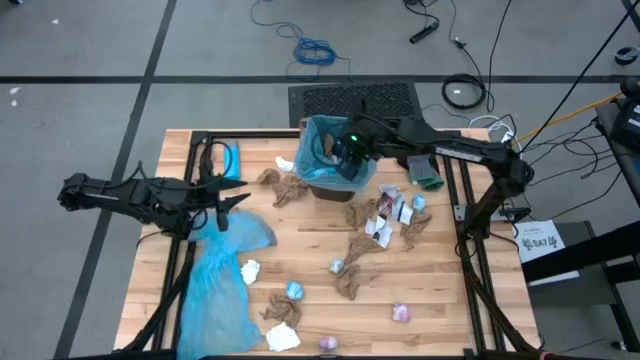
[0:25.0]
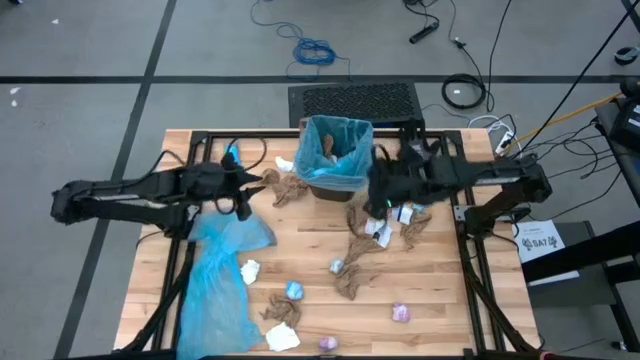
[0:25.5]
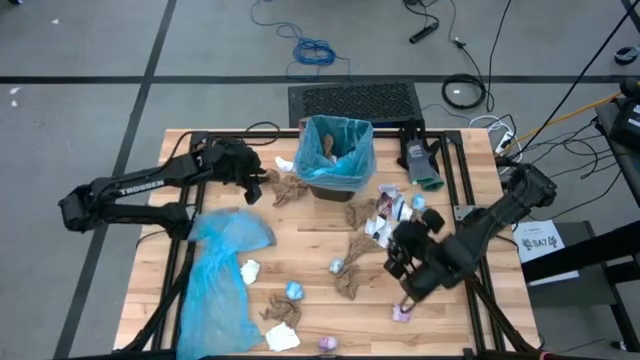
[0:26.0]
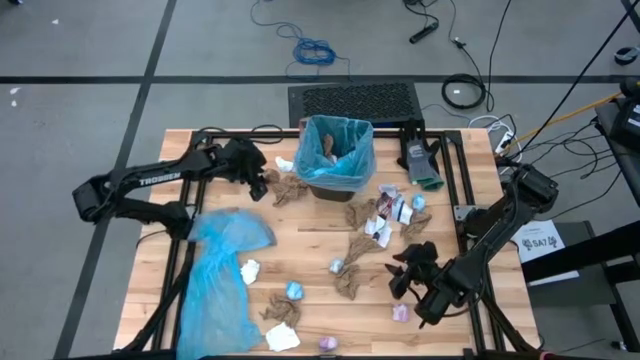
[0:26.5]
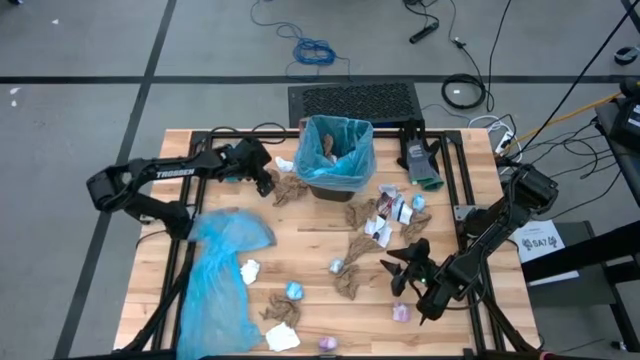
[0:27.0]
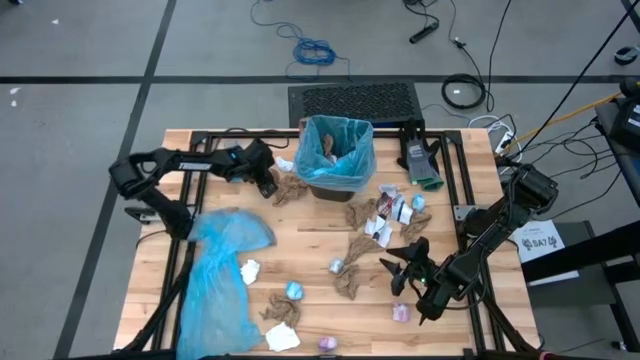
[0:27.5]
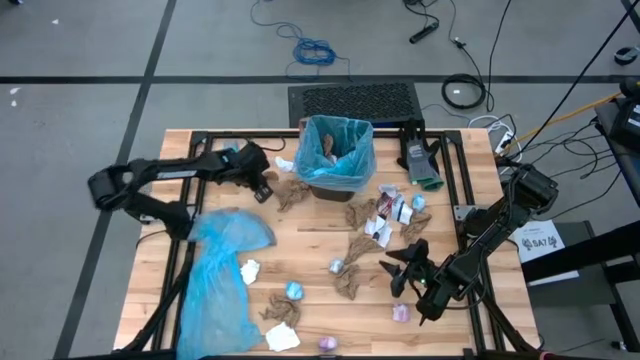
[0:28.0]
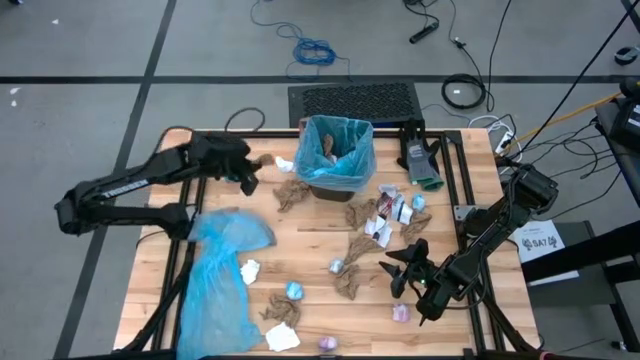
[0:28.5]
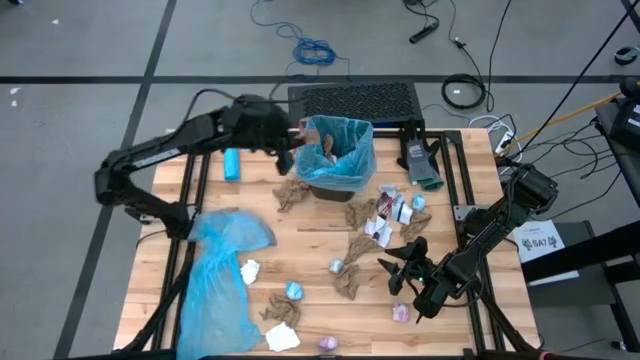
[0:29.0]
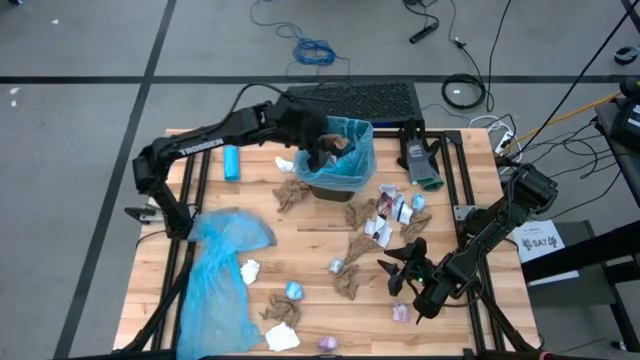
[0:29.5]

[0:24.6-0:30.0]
Task: place trash/remove bag and relplace
Put the brown paper into the trash bin

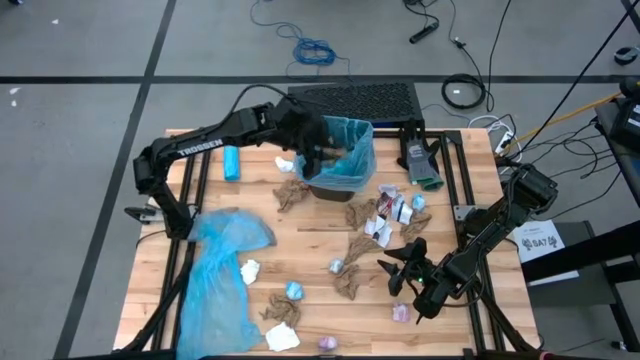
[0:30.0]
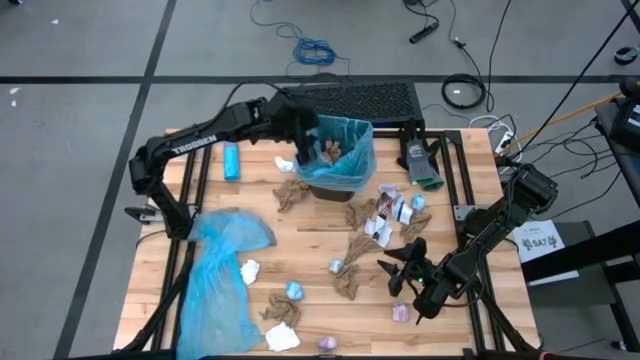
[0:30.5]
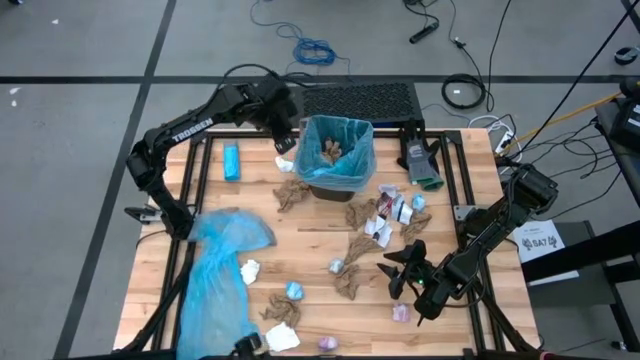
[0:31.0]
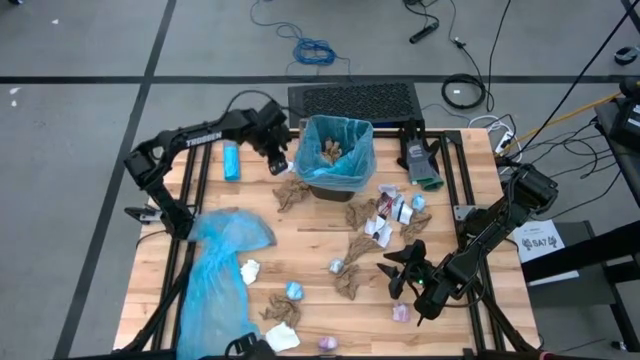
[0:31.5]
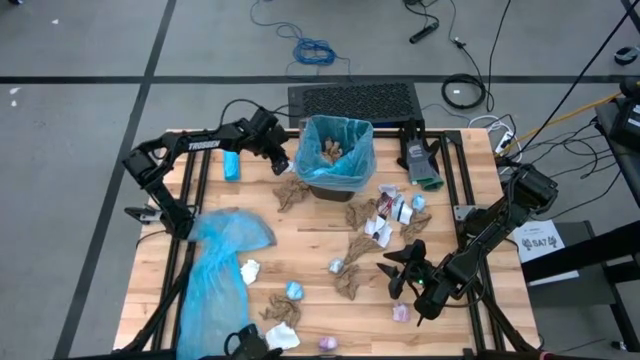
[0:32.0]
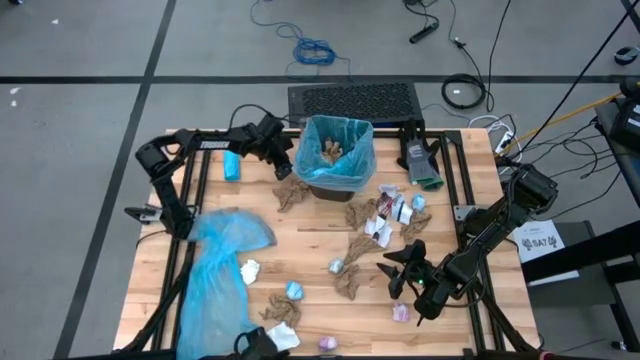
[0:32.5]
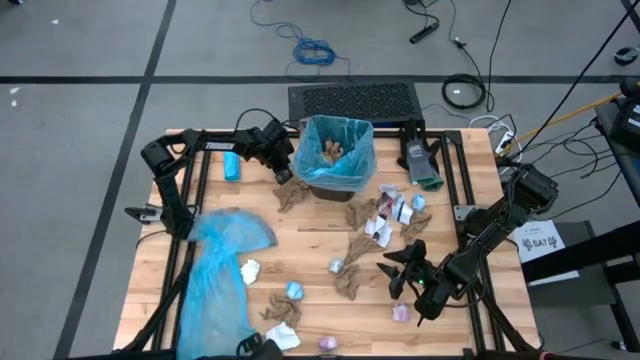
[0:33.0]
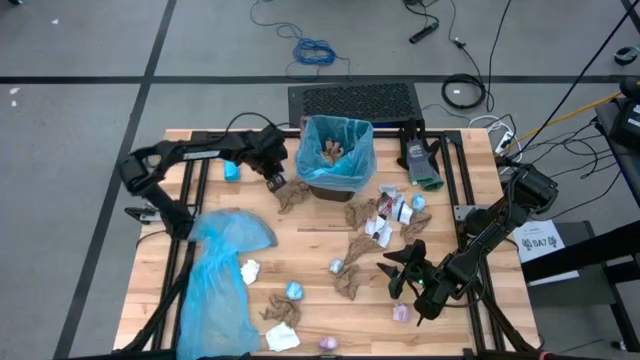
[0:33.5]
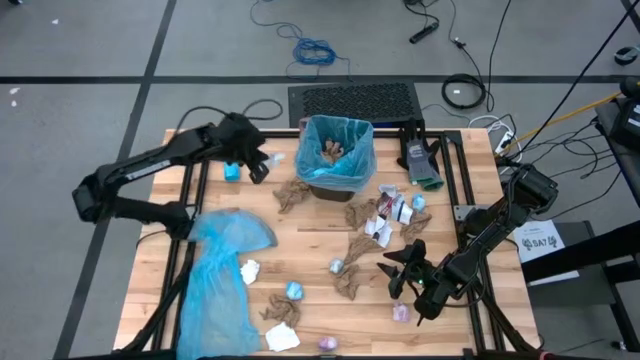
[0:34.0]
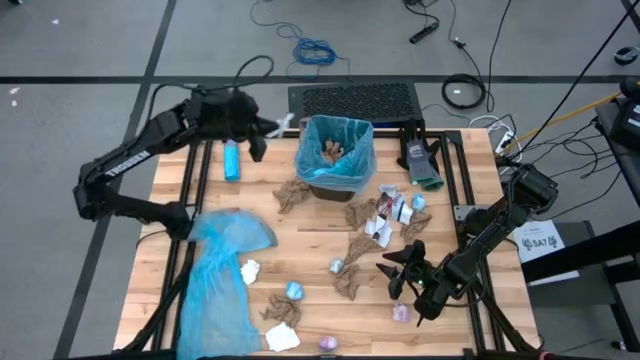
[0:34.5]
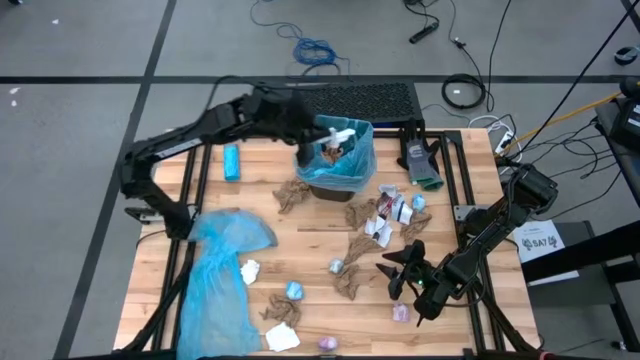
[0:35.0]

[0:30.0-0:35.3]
Put the white paper into the trash bin

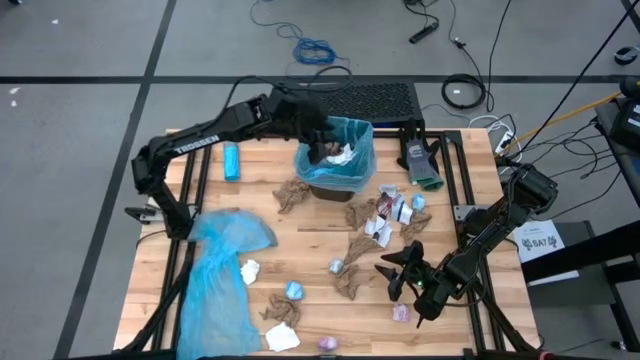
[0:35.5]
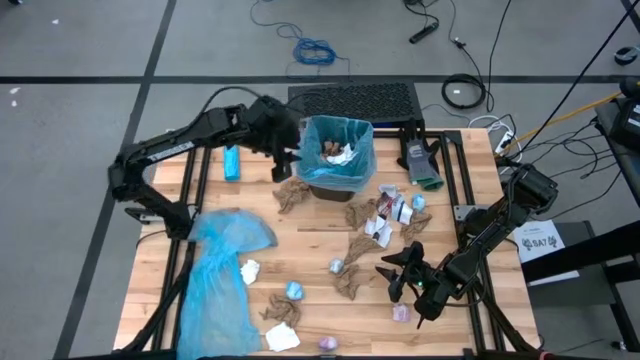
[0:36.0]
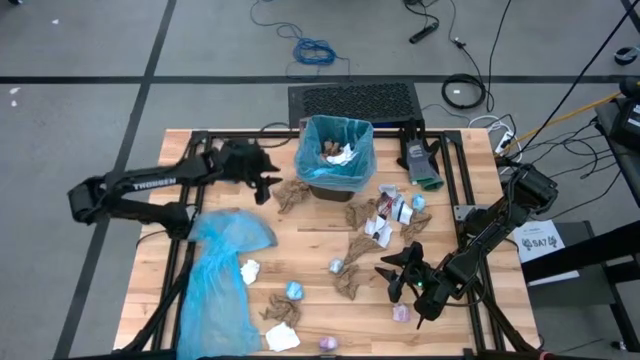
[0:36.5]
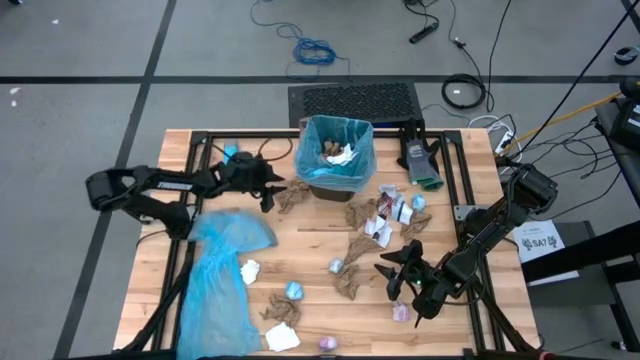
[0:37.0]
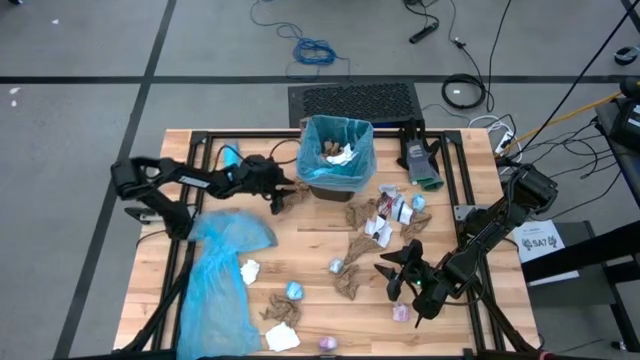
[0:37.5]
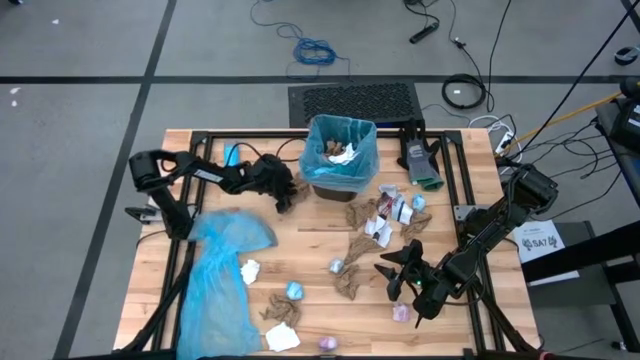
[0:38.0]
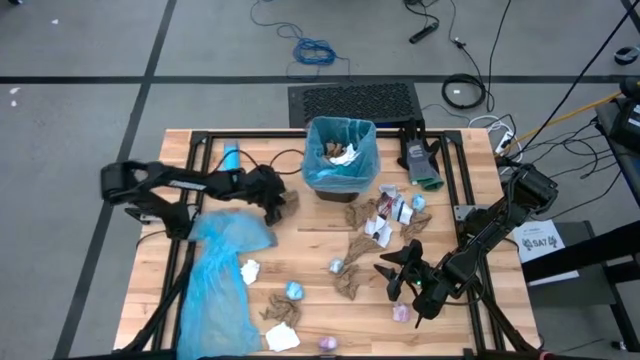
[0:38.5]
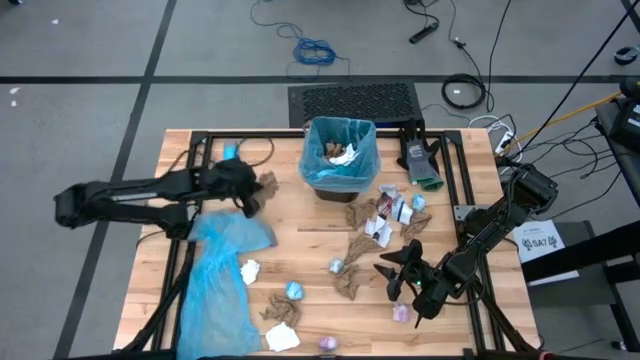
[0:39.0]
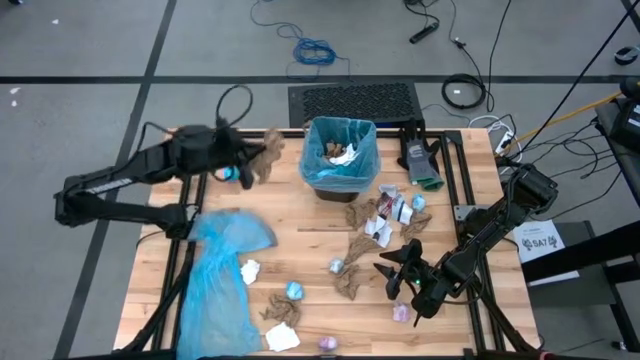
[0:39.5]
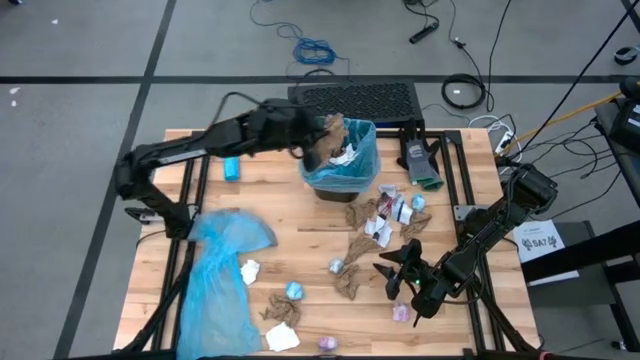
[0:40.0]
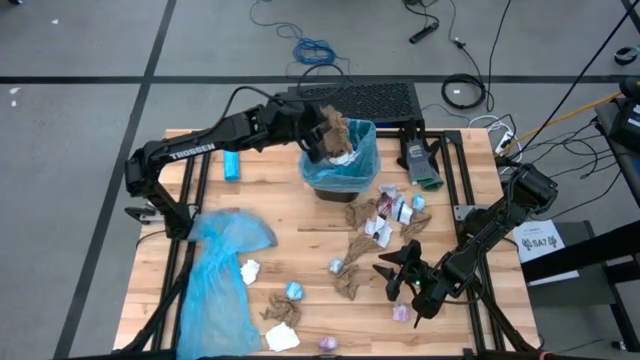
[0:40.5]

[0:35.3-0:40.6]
Put the brown paper into the trash bin

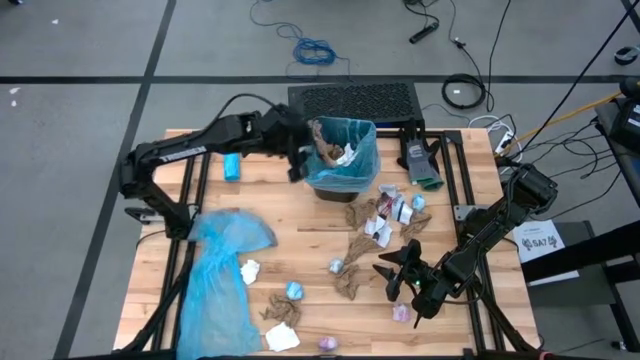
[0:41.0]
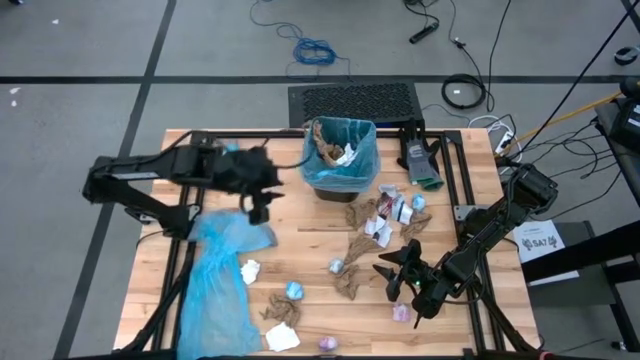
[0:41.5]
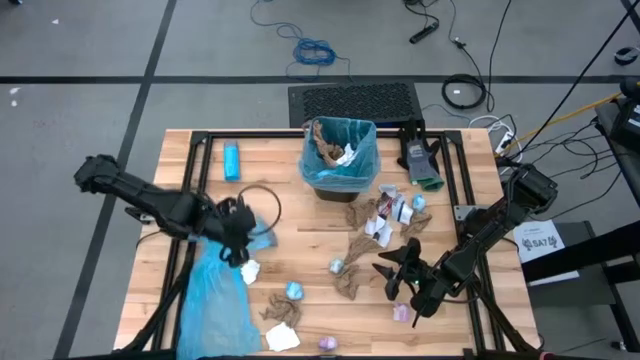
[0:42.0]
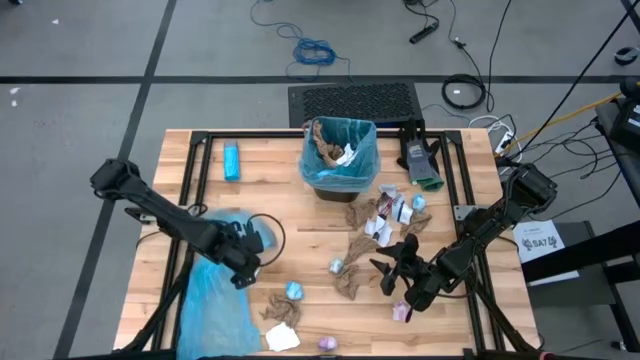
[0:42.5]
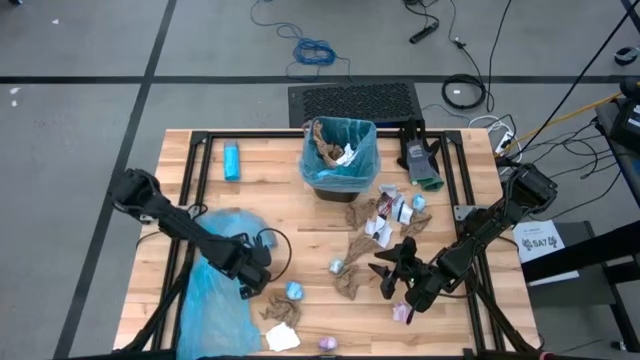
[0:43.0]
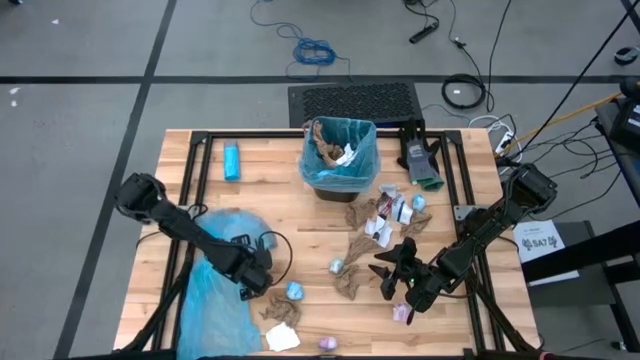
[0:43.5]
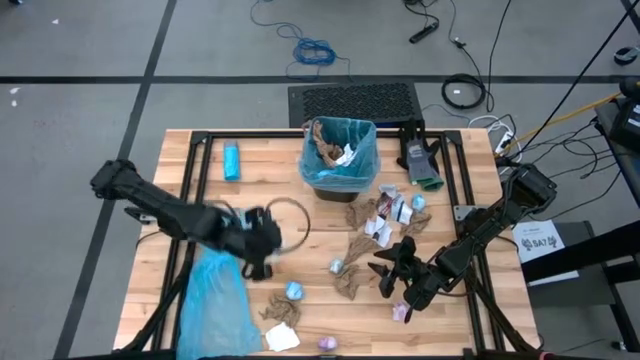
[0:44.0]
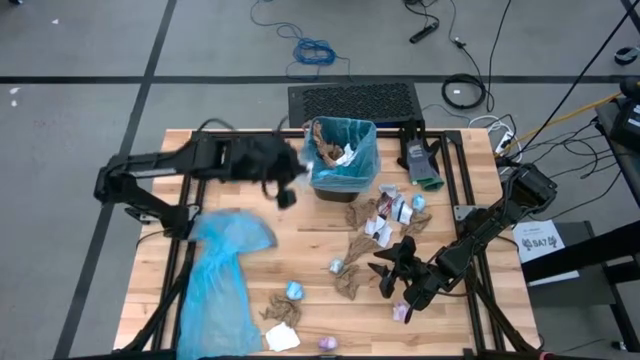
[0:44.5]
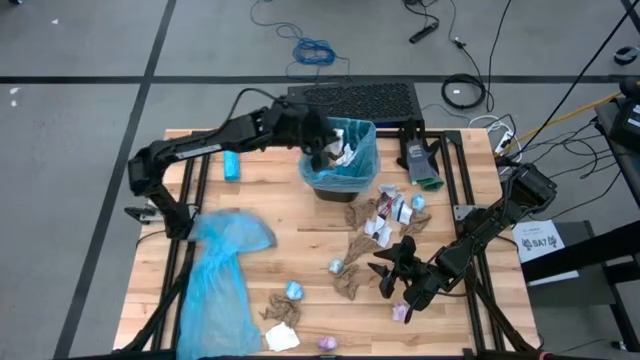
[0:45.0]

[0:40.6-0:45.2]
Put the white paper into the trash bin
